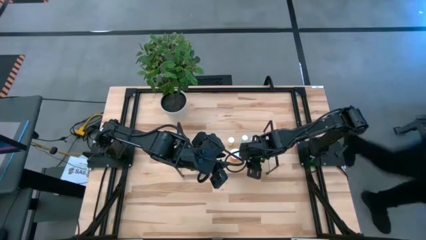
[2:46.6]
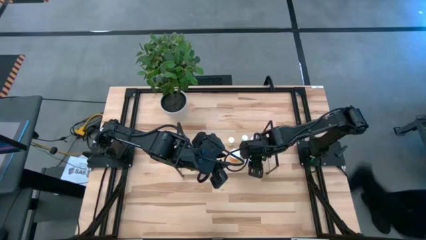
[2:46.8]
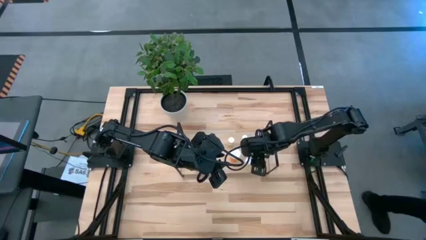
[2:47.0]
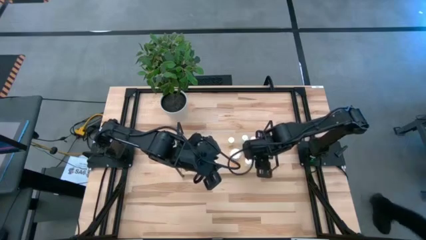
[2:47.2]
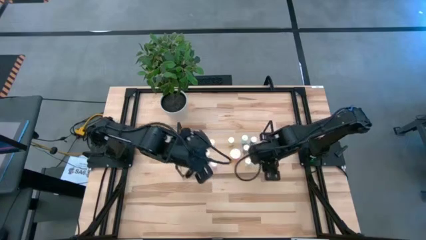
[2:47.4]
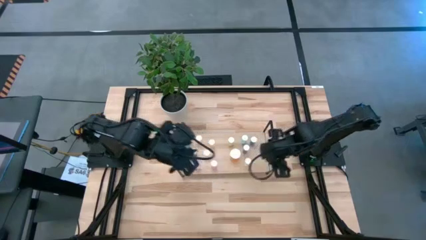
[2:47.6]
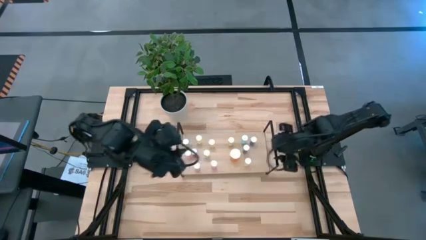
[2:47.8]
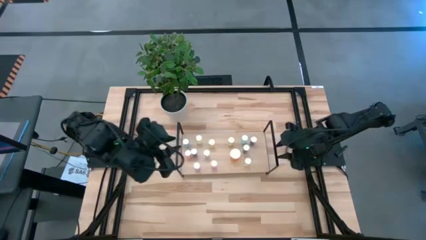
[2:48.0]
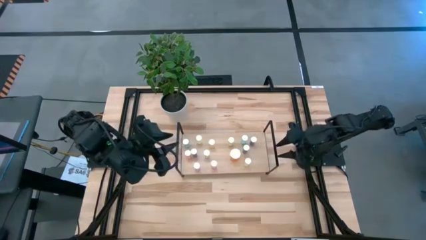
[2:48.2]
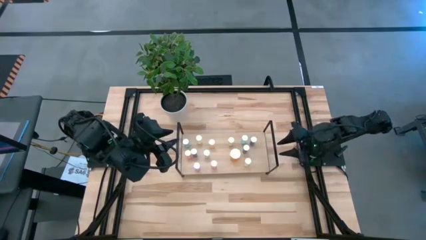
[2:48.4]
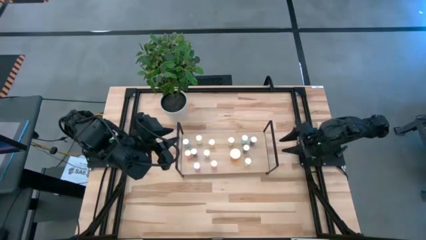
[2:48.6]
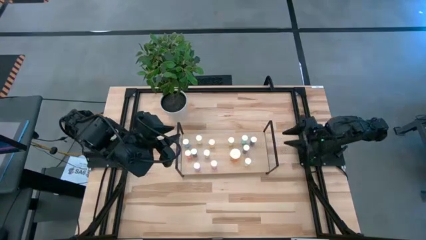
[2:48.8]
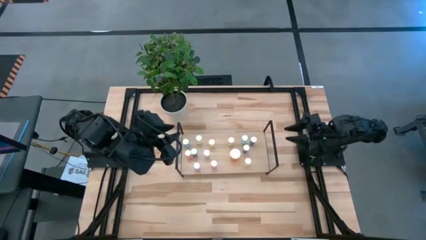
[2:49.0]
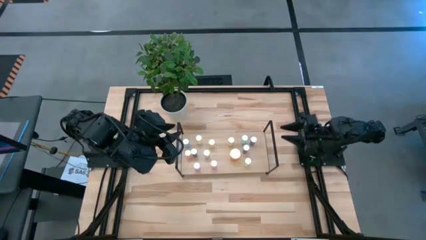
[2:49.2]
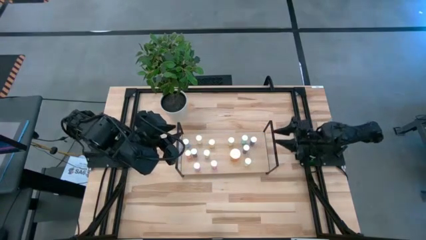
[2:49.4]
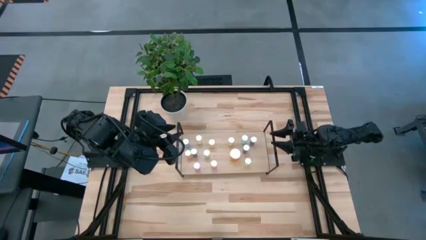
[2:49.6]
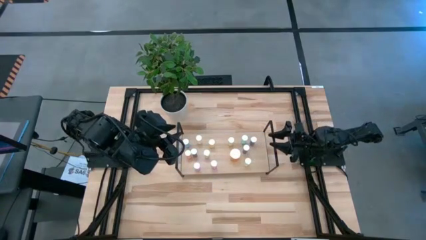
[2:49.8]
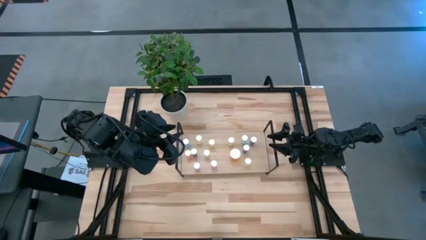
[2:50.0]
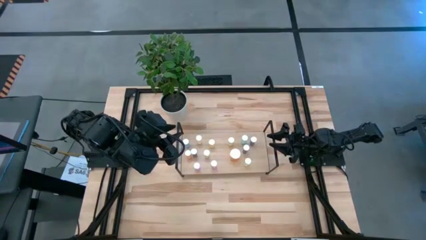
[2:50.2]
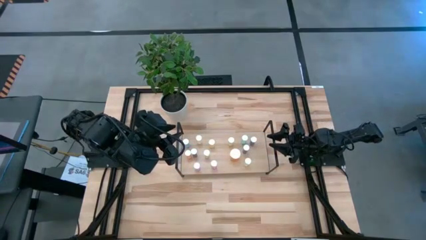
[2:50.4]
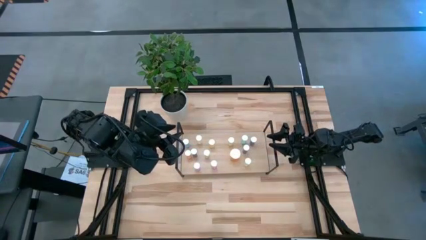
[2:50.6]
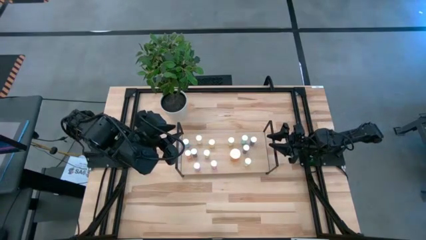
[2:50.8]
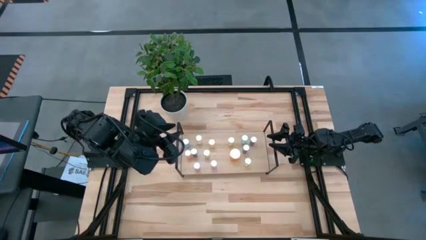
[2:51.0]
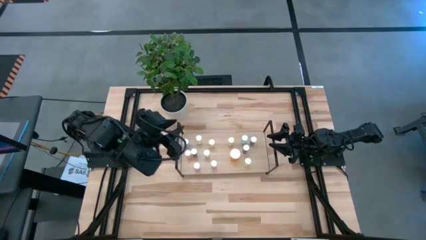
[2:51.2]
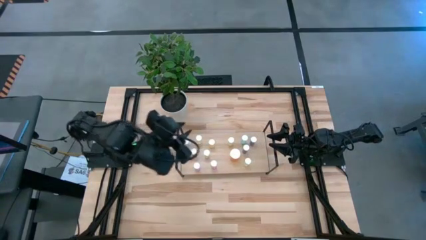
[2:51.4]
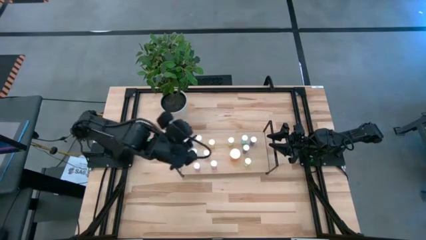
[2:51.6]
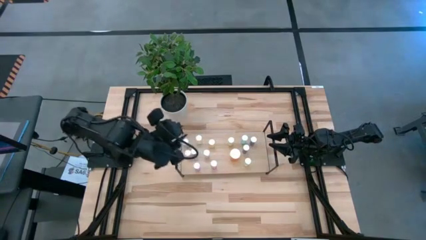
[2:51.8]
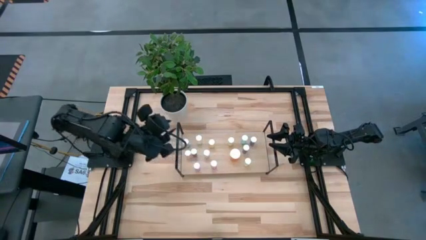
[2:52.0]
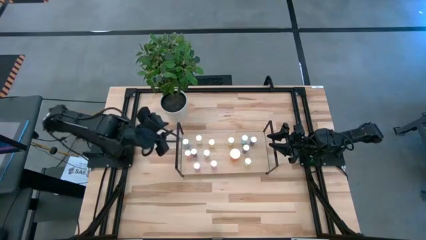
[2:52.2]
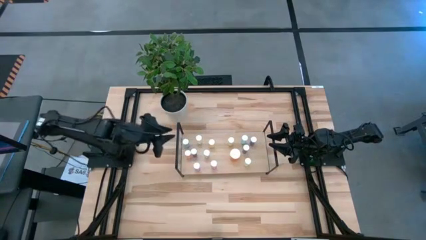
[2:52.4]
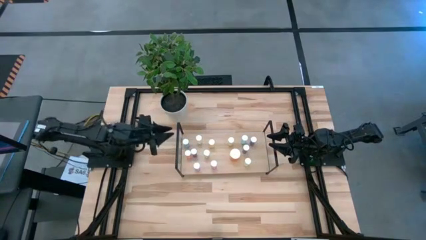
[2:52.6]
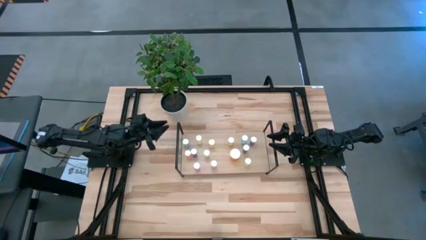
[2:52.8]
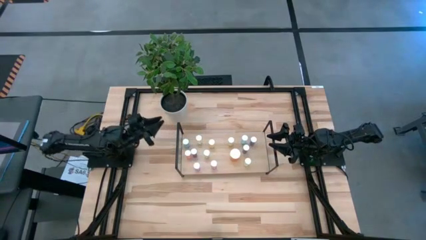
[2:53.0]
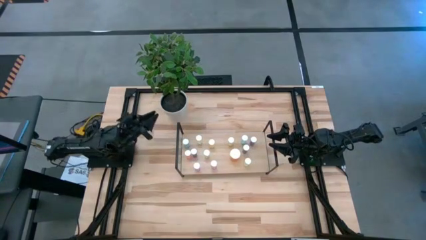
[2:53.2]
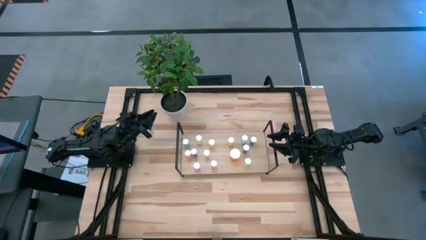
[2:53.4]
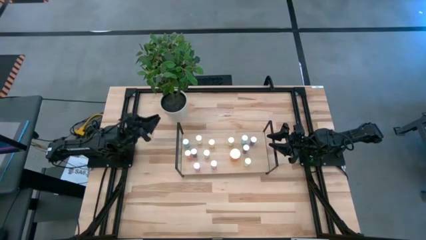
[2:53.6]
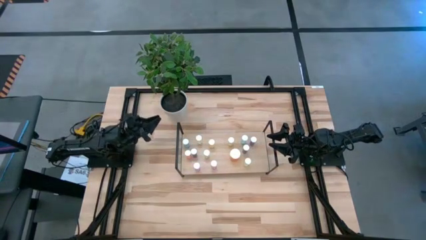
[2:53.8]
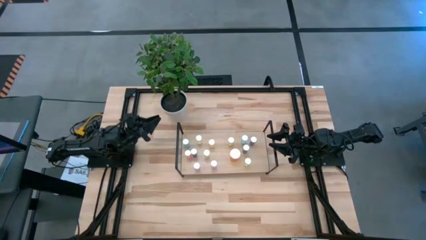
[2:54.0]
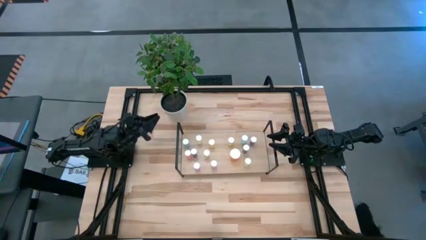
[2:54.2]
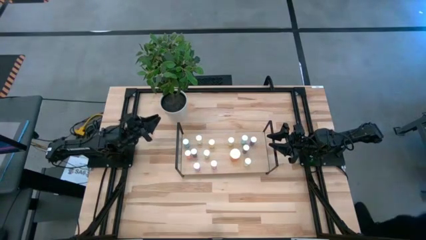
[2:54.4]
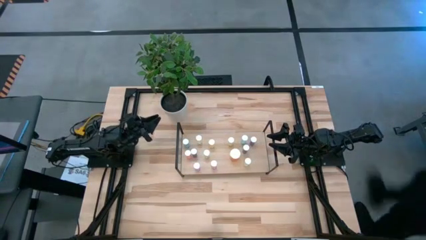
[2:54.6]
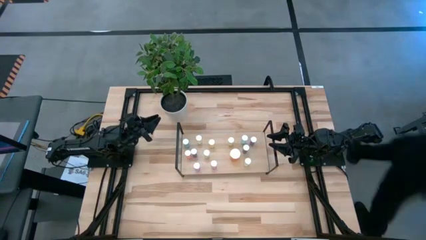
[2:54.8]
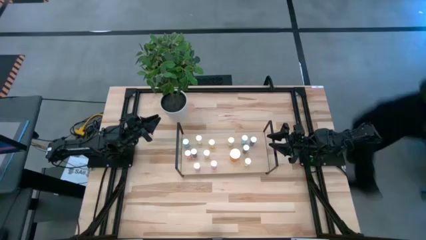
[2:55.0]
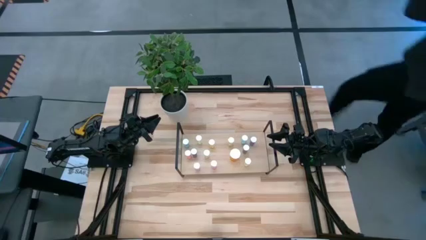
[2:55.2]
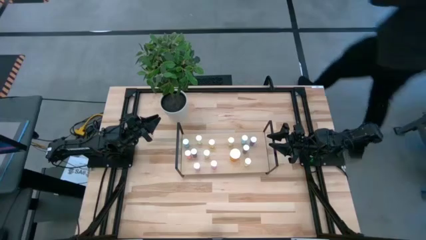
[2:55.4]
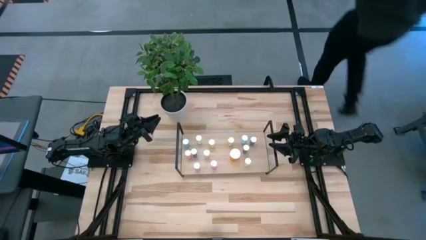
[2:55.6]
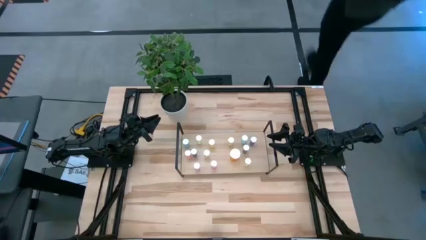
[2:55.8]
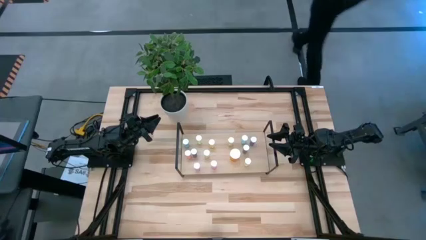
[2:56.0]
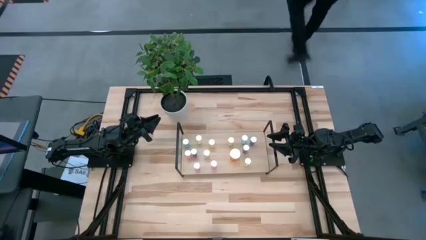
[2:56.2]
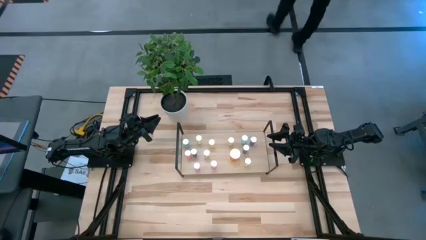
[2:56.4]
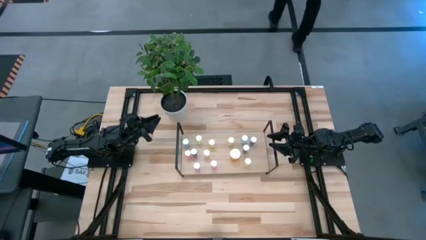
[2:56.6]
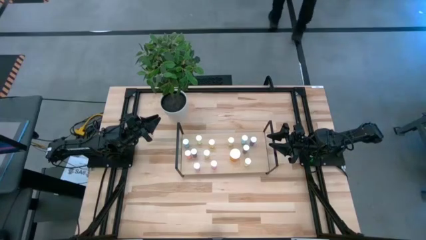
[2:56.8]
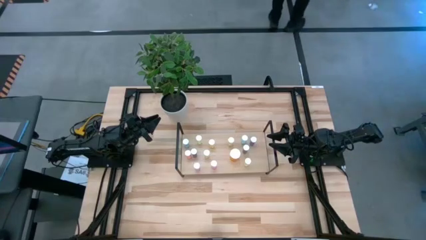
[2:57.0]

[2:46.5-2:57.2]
Task: Pick and place medicine bottles onto shelf by color
Return to Home Position

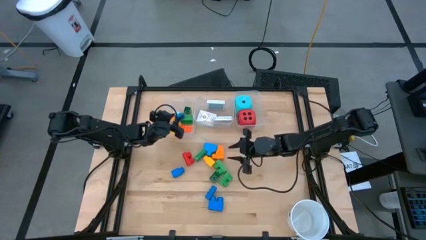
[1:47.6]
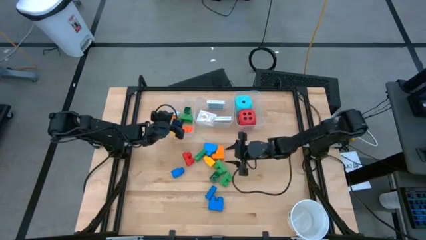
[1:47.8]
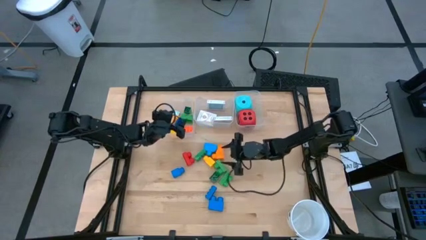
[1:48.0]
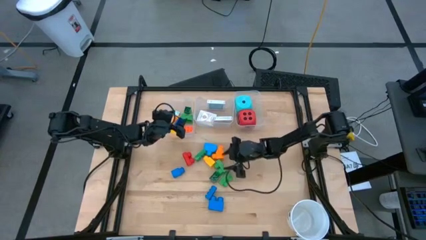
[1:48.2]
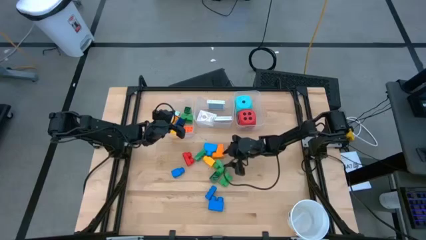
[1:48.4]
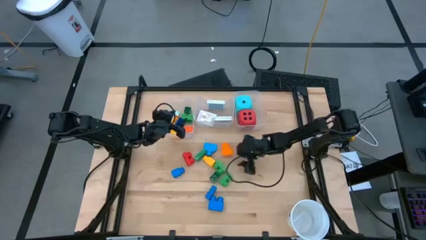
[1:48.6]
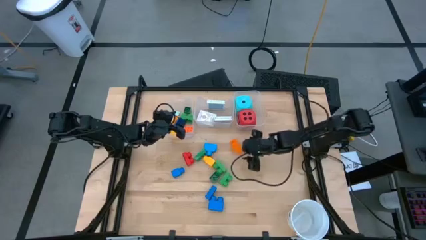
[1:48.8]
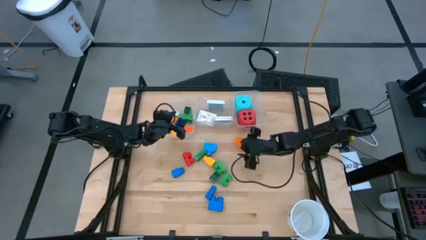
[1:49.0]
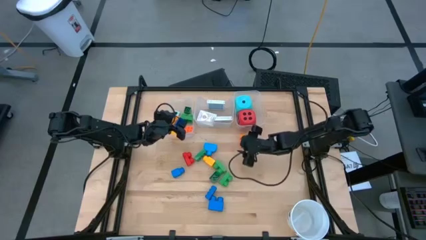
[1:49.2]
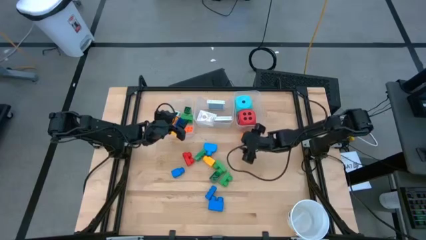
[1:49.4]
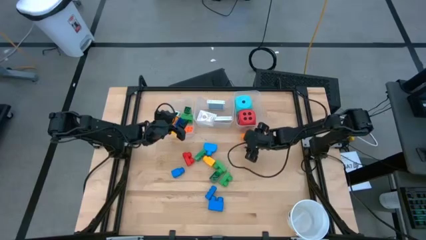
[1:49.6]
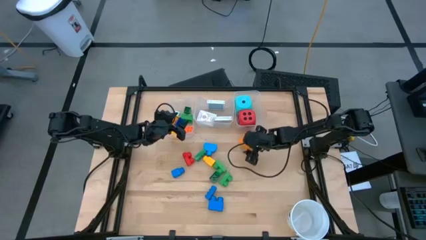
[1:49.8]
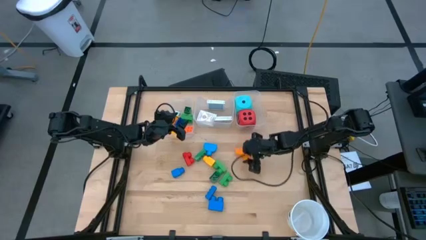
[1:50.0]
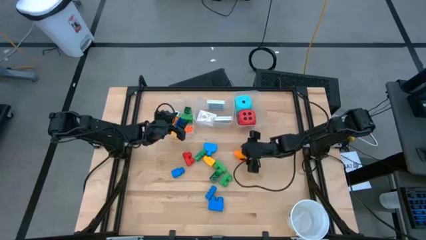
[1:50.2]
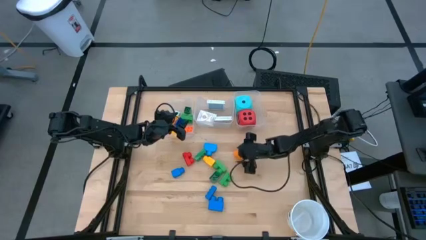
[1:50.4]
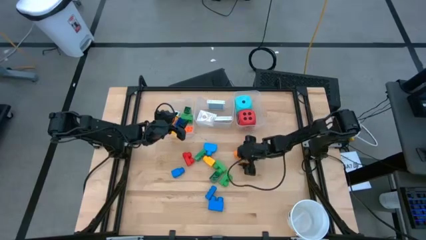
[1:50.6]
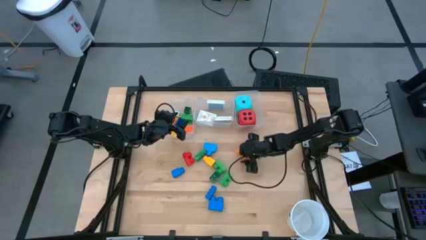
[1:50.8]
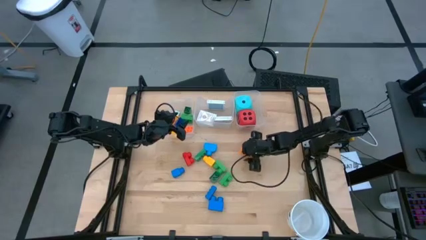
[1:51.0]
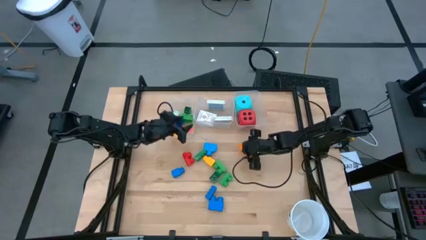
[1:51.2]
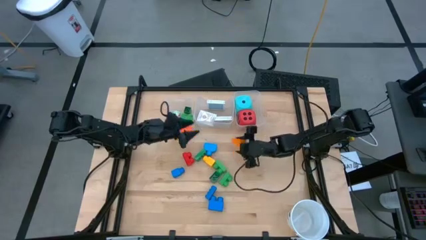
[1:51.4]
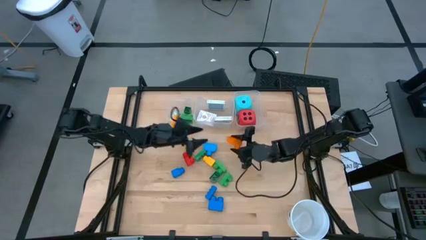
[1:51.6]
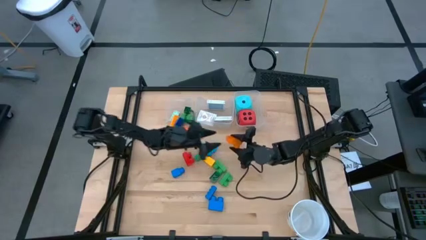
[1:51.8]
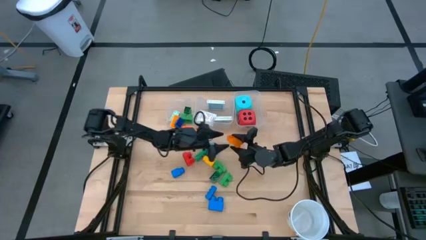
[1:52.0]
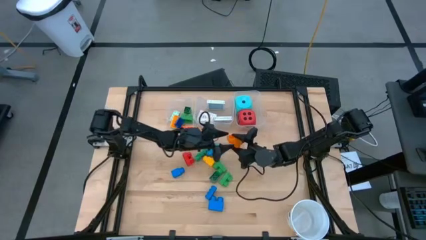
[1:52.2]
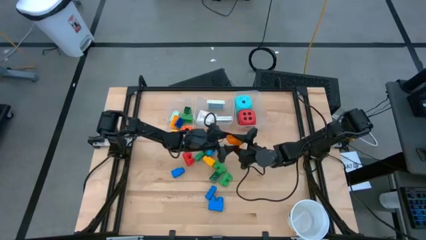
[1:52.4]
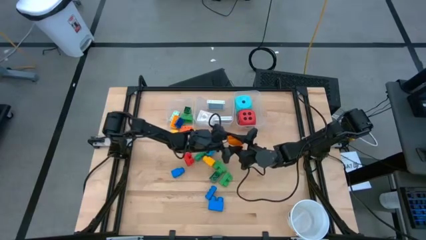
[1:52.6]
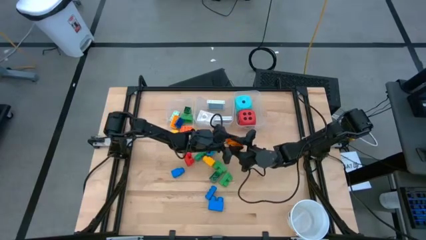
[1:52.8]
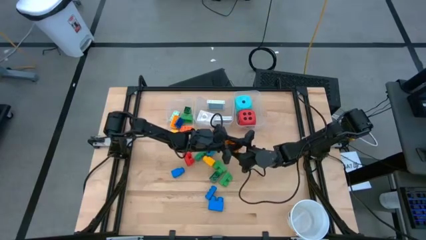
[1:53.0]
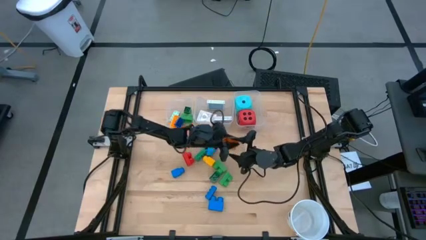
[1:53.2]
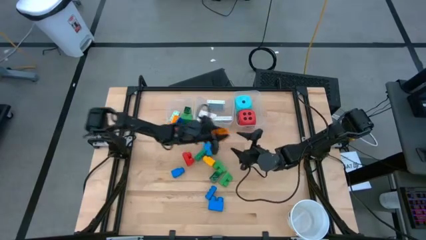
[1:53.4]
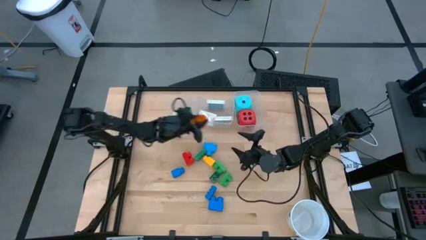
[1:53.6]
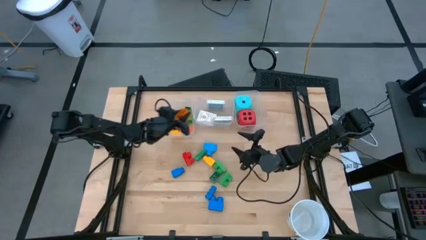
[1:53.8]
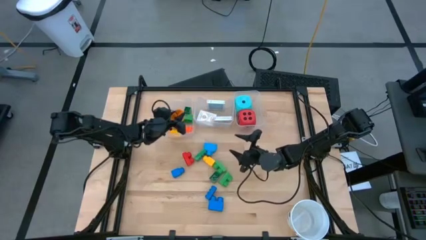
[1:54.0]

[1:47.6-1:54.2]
Task: Pick & Place Toys
Put the orange game piece into the left transparent bin
